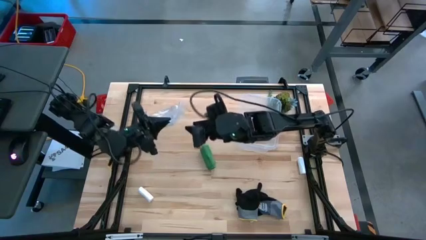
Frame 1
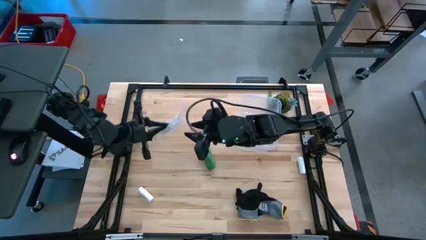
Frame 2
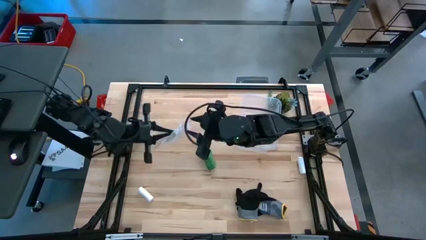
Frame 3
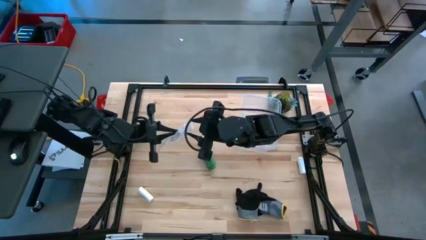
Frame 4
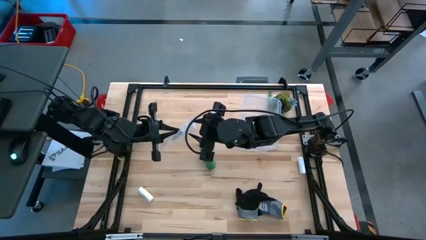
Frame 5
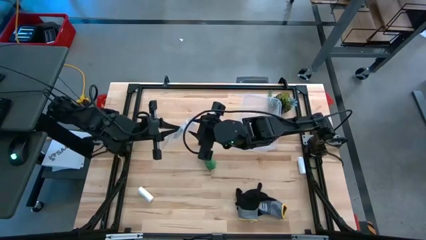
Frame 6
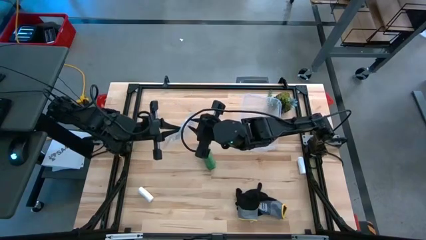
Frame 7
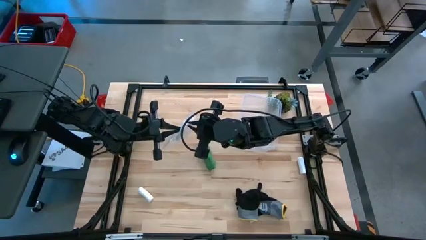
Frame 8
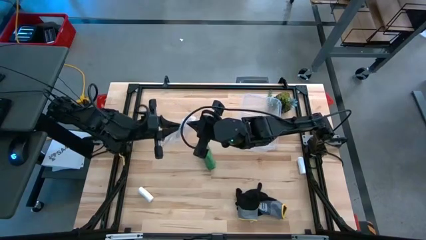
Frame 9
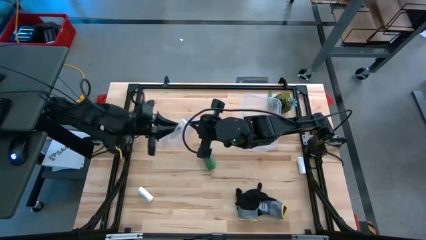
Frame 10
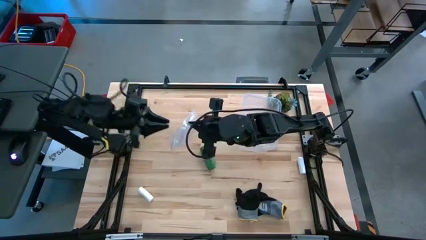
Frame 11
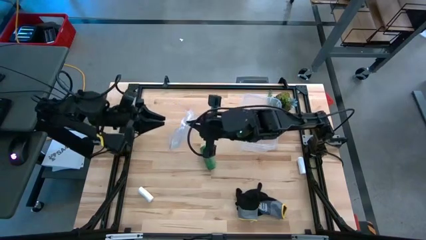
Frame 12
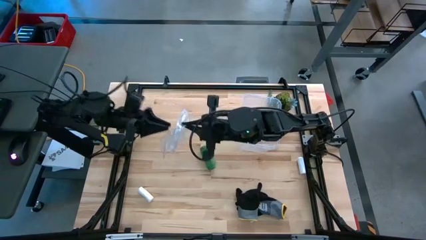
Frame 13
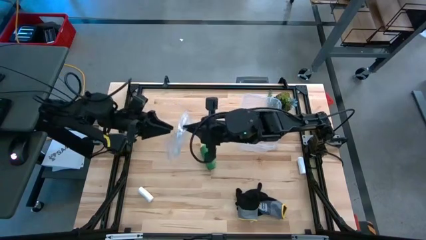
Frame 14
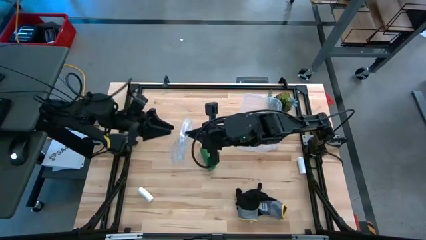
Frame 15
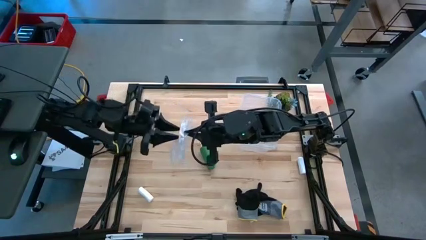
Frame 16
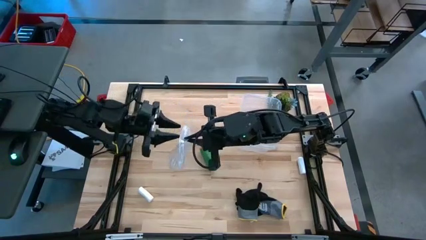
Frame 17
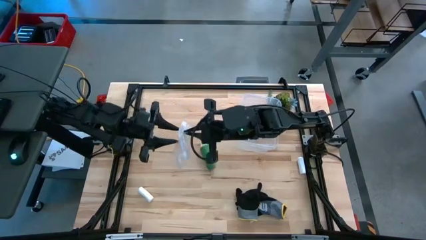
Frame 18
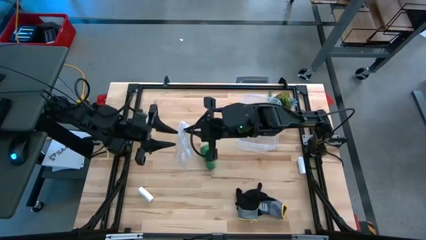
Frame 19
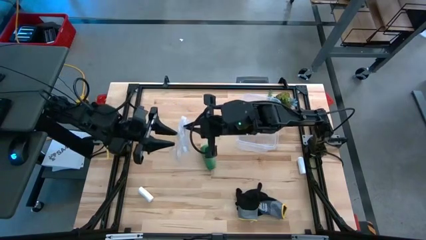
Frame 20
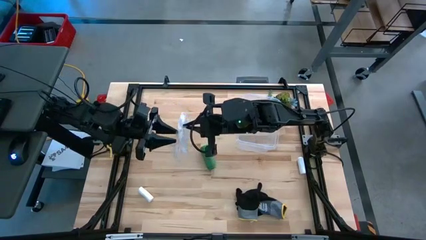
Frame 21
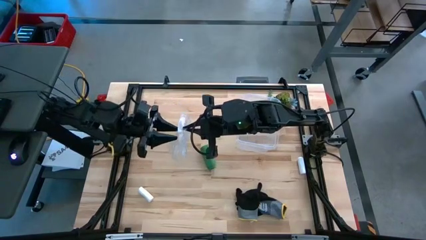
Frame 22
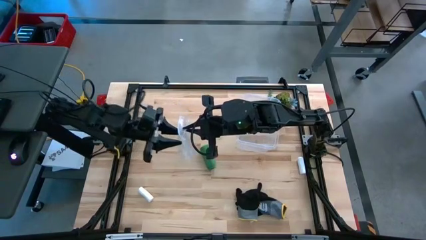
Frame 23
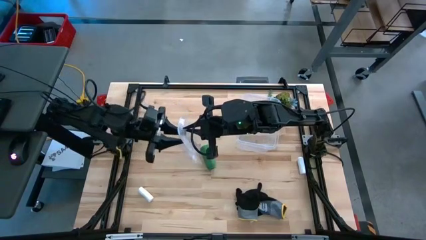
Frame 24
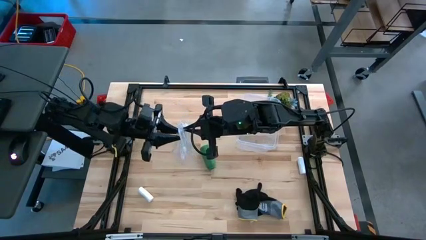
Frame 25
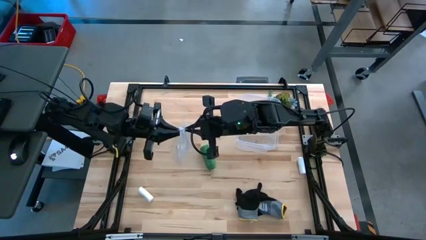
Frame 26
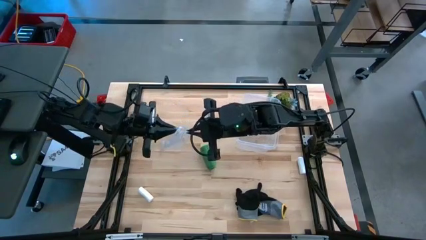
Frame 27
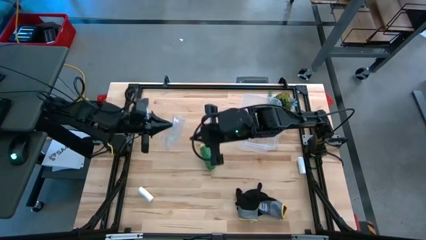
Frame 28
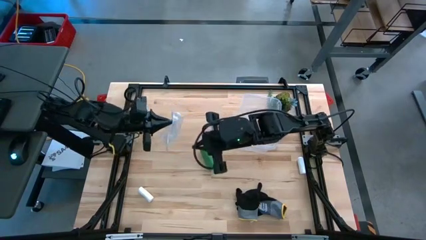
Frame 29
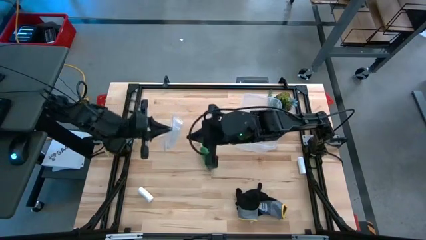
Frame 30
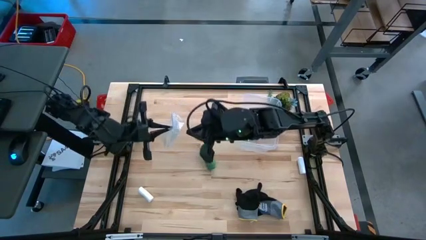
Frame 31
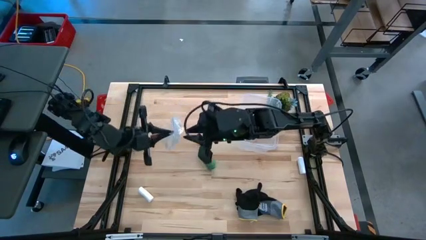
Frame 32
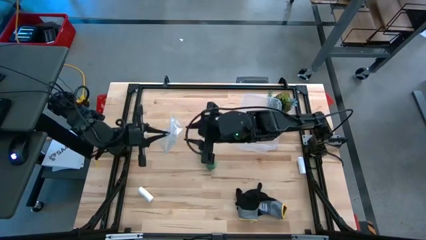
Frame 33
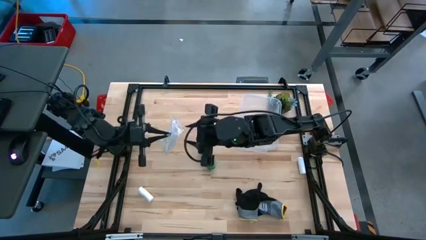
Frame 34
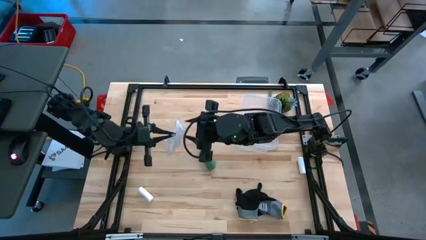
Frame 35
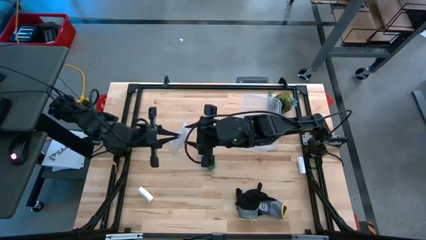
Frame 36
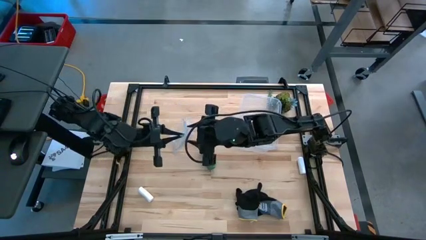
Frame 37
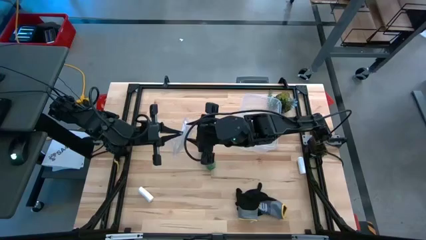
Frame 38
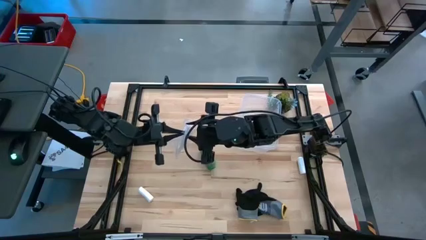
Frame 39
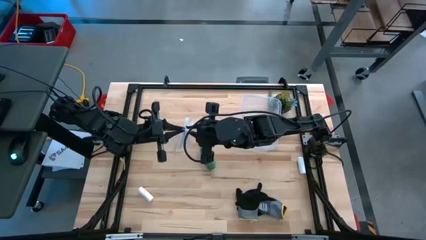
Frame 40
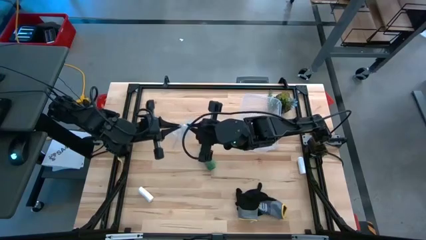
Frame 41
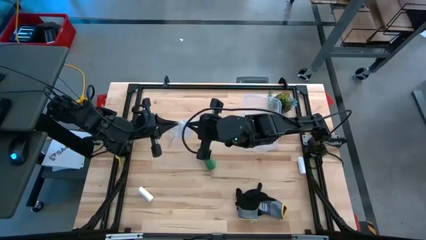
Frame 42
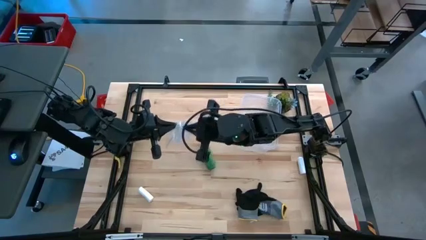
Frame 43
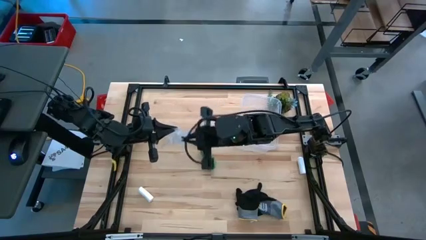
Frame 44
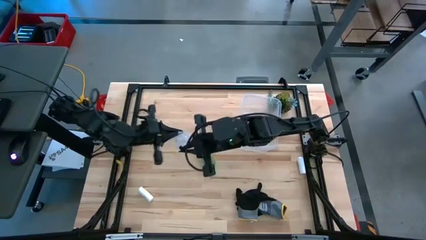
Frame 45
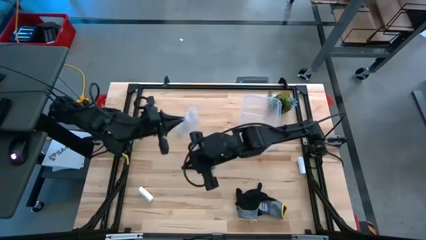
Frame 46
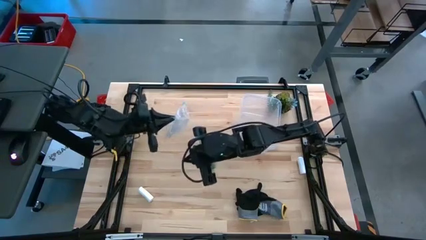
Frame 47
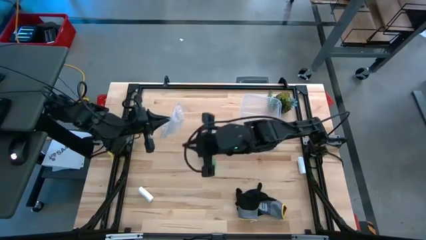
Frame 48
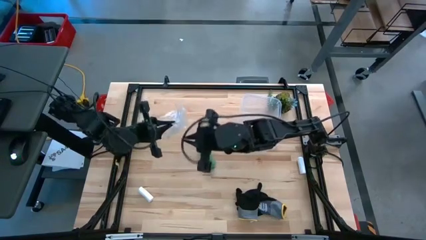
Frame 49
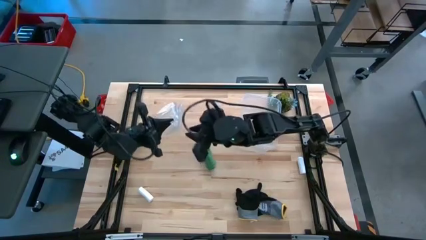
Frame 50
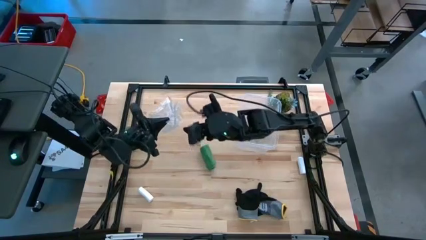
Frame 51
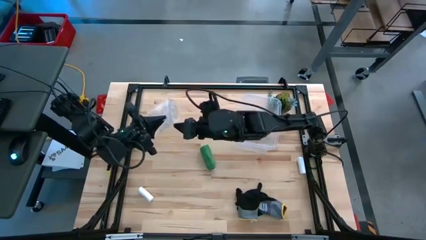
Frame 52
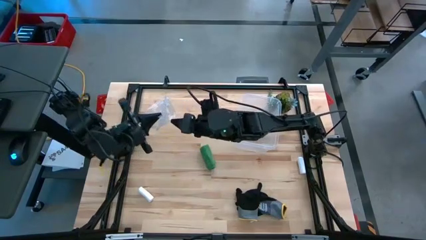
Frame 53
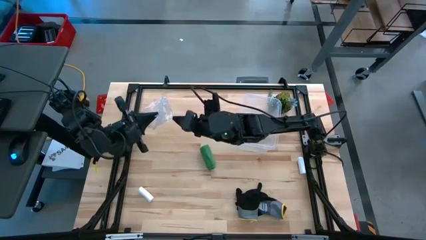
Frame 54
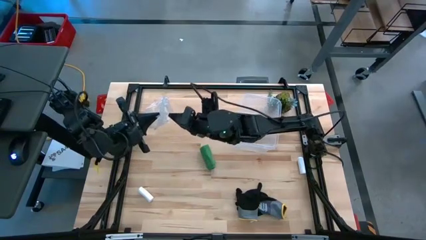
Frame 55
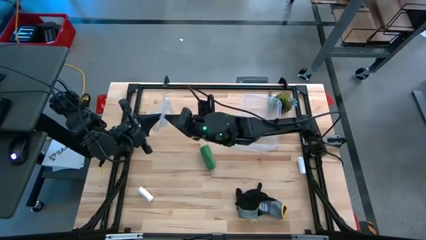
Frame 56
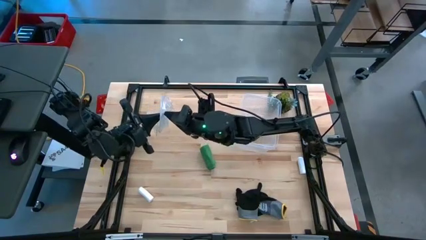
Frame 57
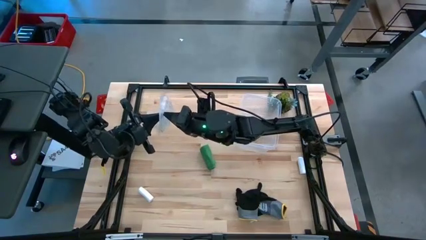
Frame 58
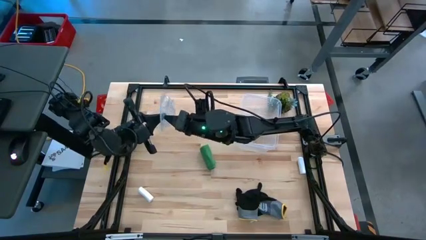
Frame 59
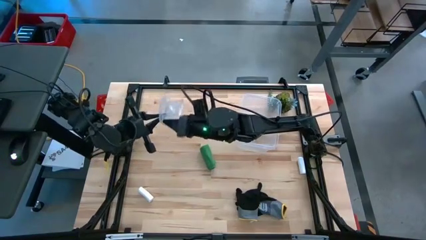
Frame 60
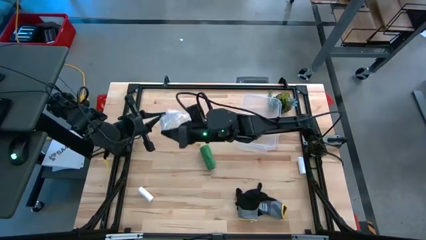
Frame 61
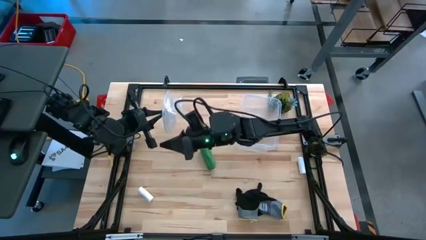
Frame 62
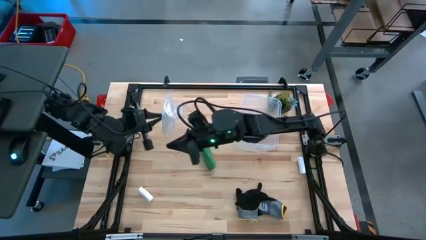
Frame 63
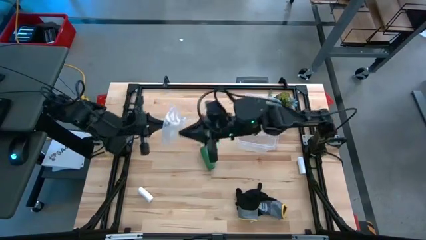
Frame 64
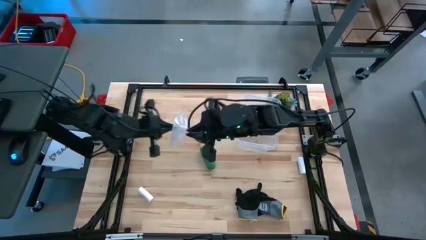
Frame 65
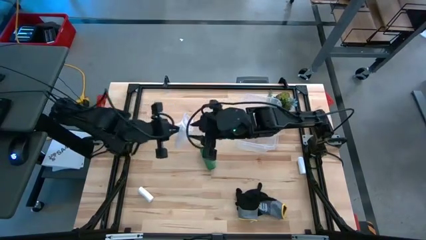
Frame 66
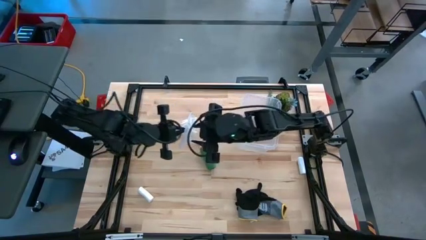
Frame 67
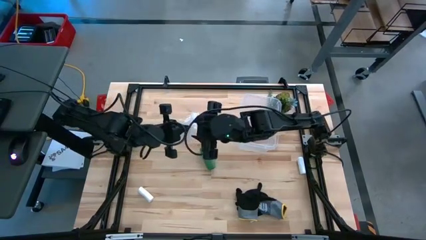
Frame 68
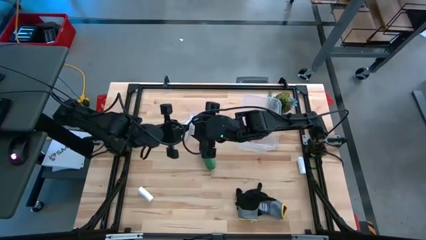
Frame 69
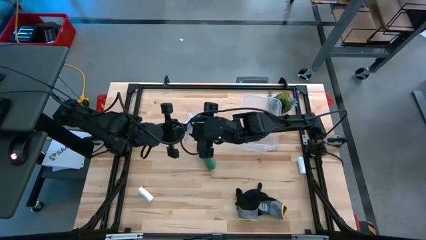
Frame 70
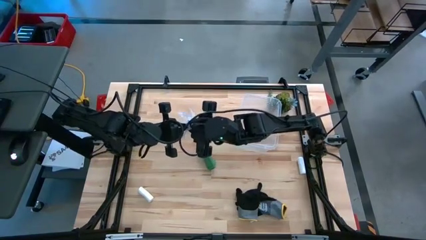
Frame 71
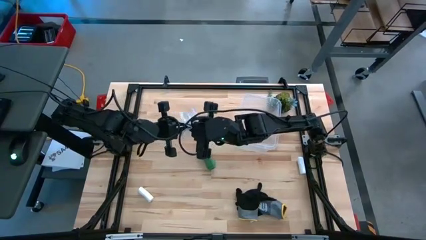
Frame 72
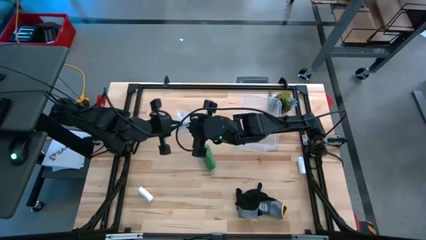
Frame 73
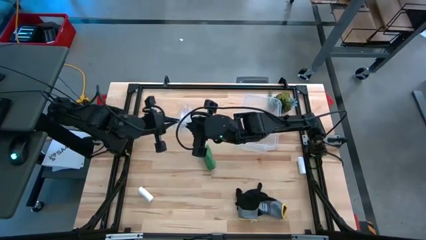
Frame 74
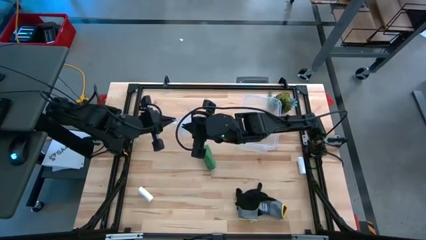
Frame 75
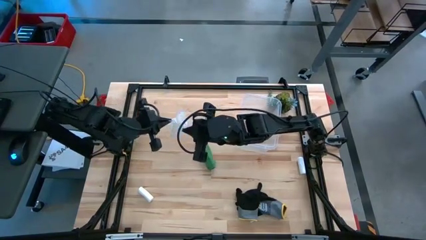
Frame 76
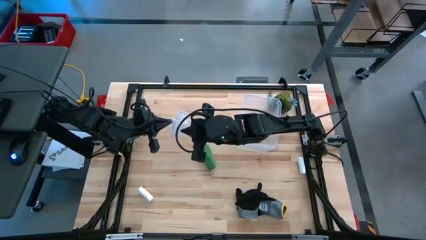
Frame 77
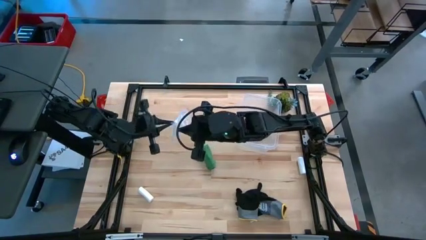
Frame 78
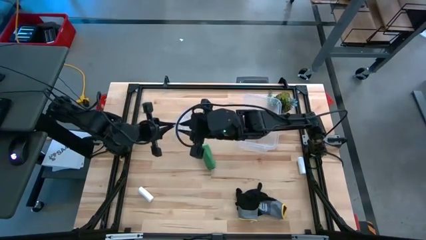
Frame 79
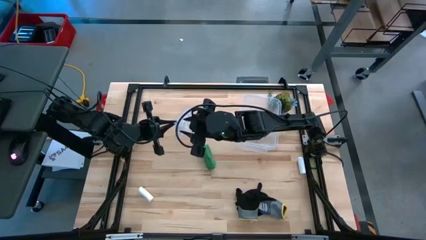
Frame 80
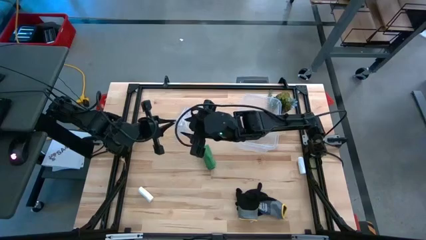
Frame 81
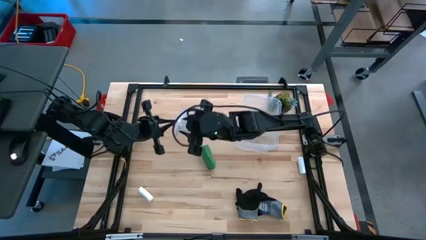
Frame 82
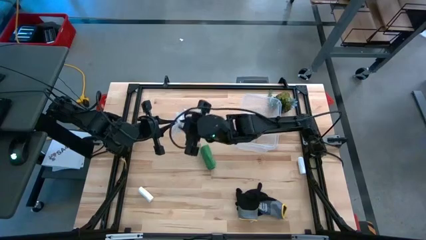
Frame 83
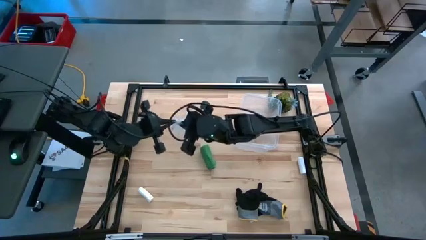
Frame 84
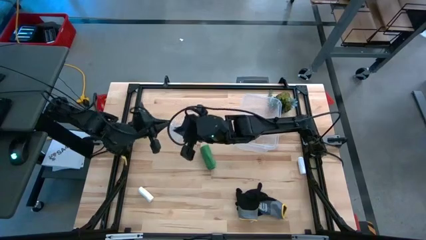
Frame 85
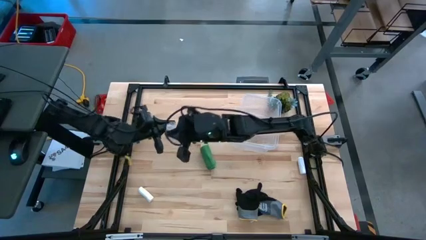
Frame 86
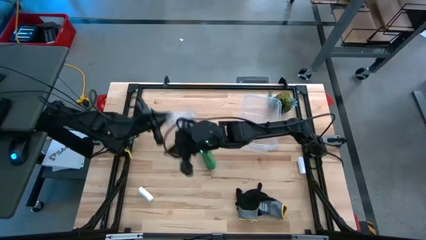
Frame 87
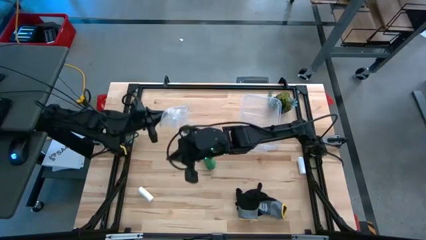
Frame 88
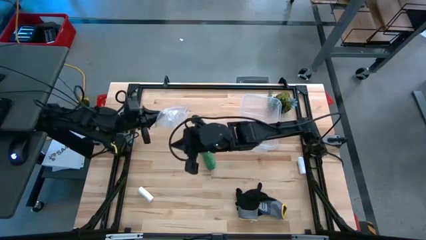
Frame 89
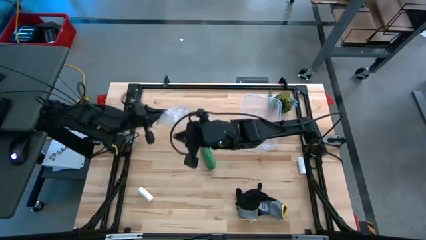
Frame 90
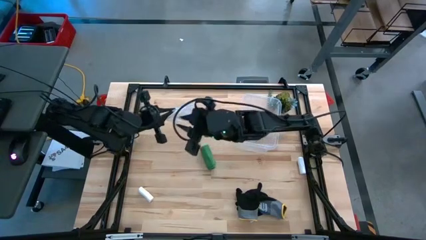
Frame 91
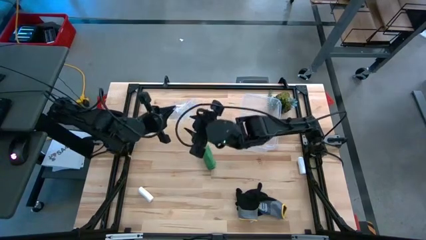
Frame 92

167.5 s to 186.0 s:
Task: Roll bandage
Open the transparent zip bag
